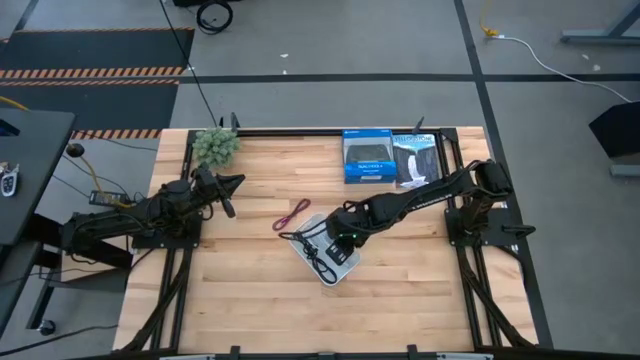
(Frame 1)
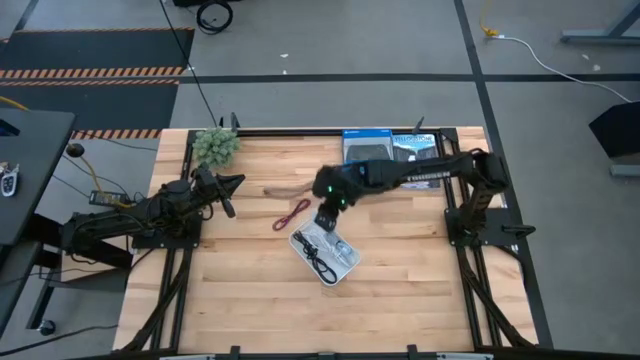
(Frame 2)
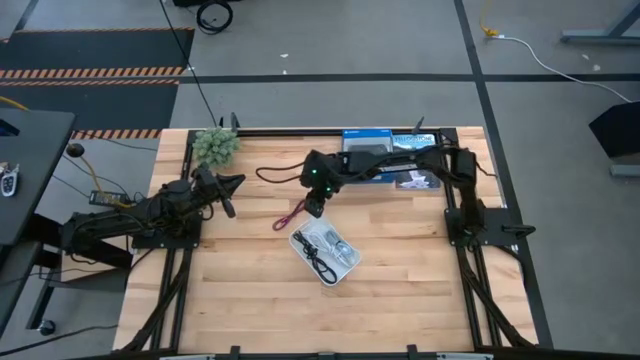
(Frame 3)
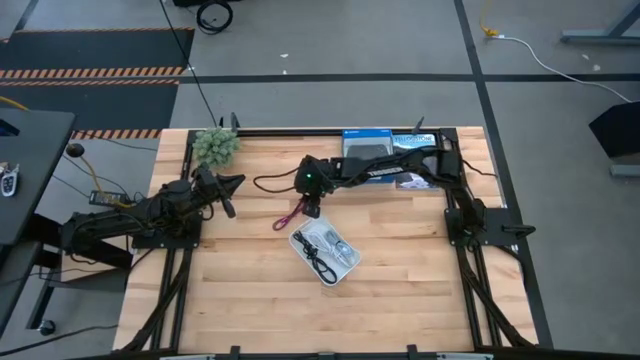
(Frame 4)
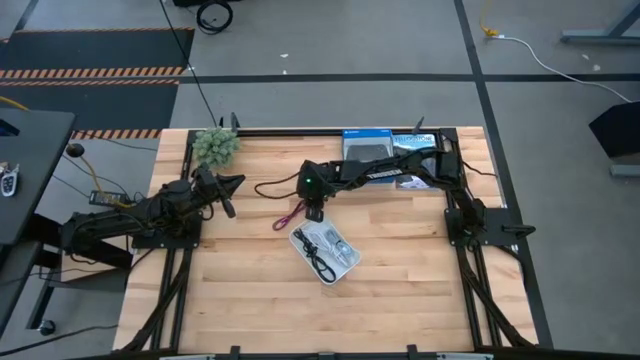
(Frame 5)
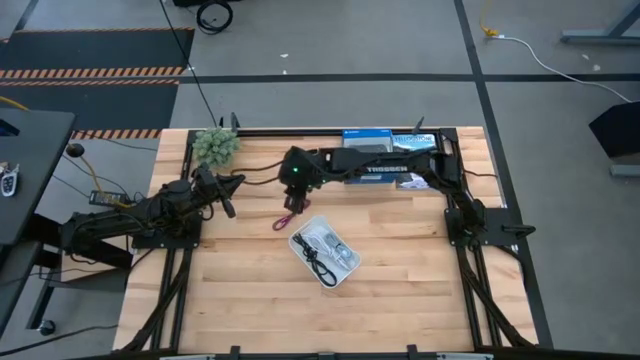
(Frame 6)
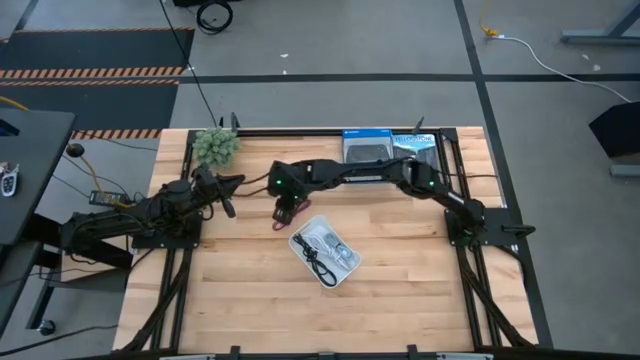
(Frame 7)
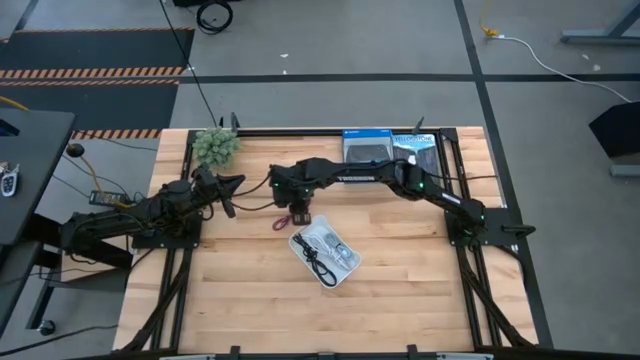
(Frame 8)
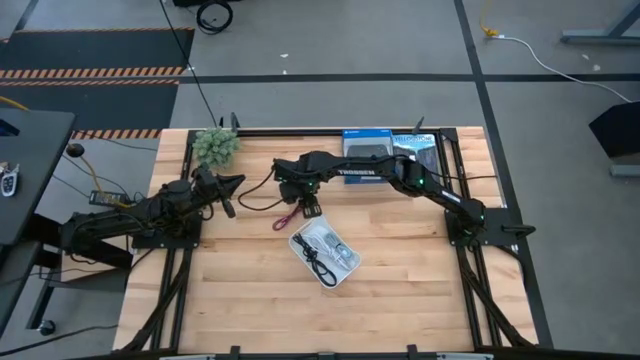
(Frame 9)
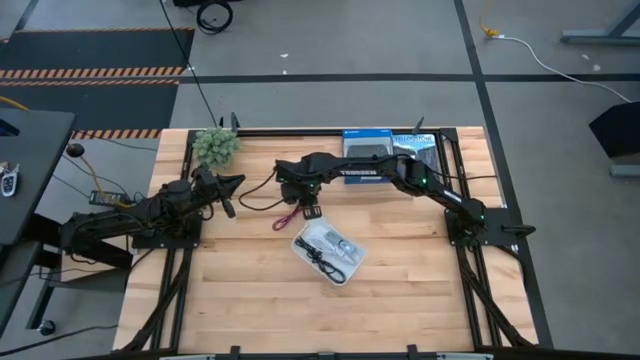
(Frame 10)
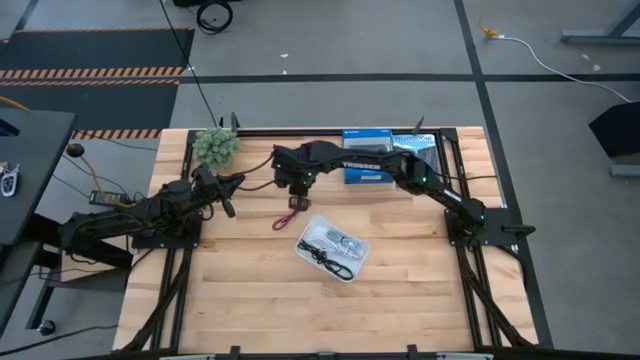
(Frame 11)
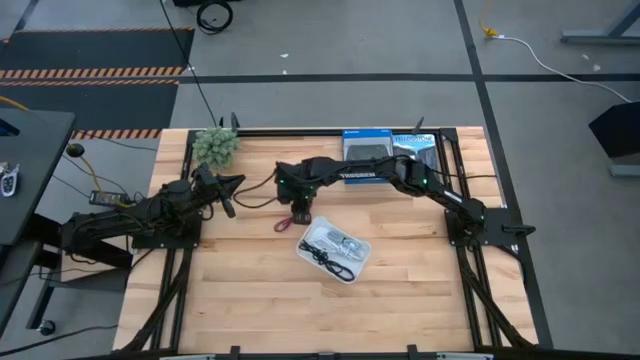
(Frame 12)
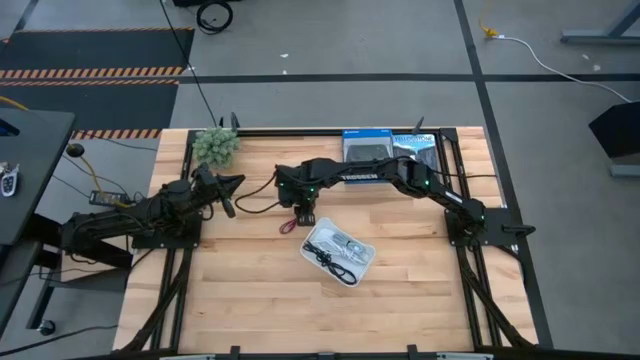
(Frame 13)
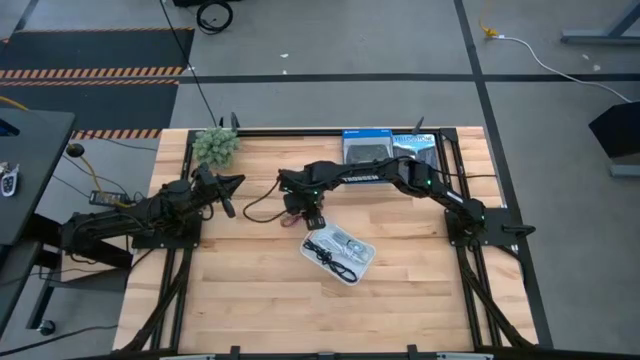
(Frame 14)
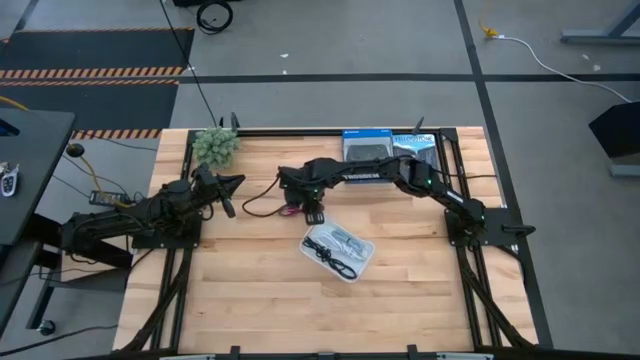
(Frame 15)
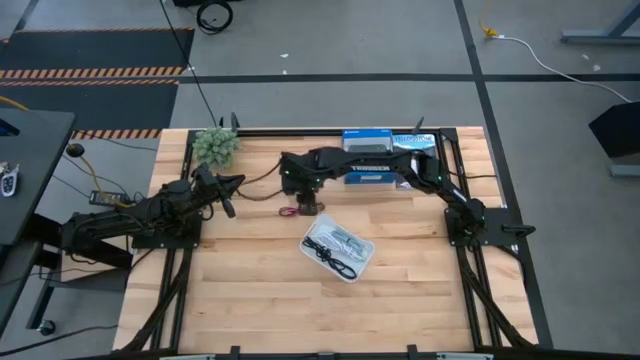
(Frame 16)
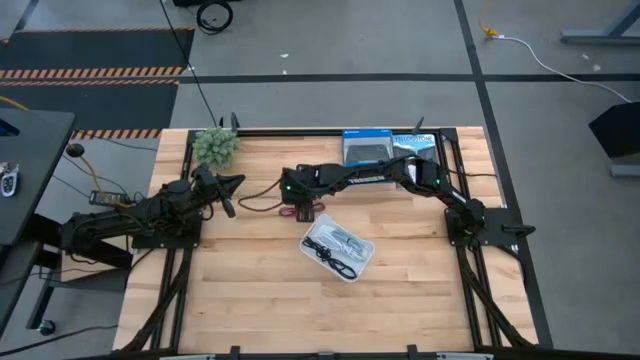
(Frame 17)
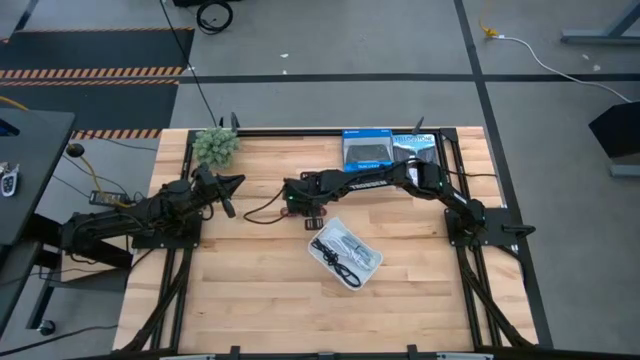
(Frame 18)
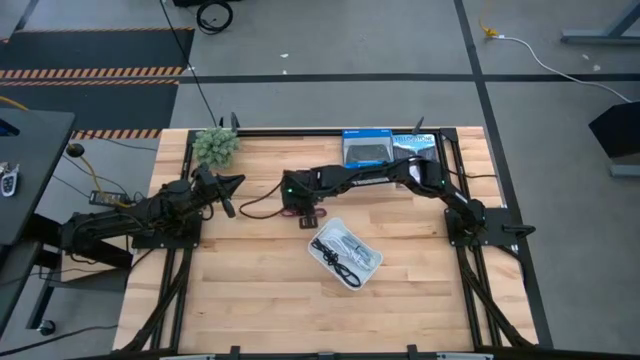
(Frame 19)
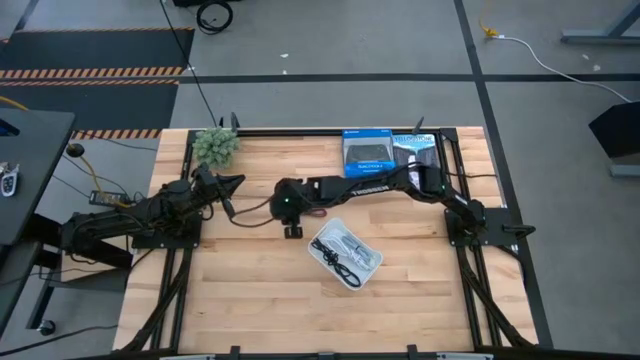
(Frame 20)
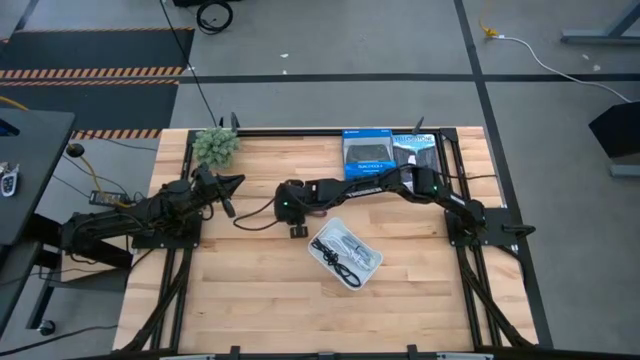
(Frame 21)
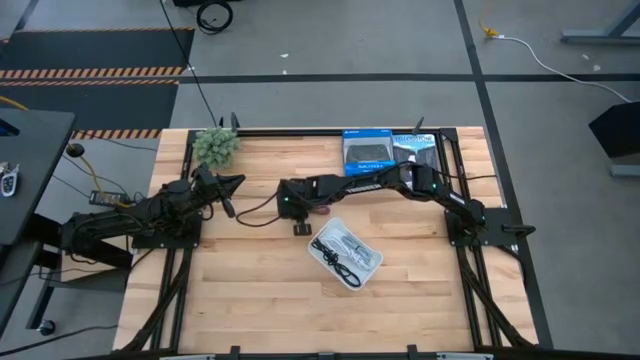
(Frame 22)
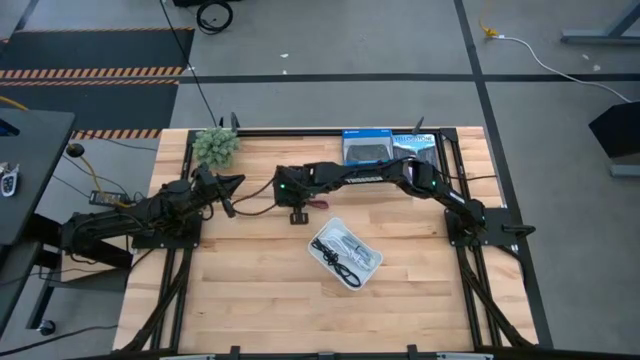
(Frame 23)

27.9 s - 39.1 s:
Task: Pick and place USB-C Cables
Put the pink and black charger cable into the white bin

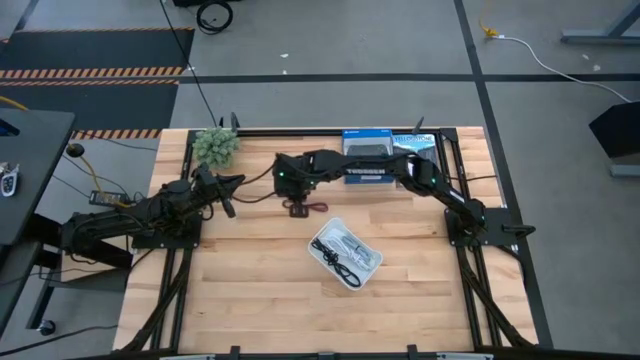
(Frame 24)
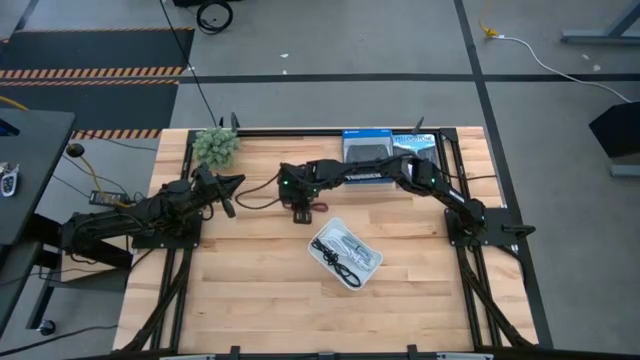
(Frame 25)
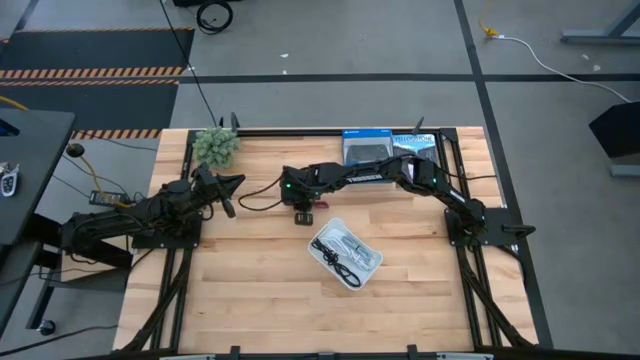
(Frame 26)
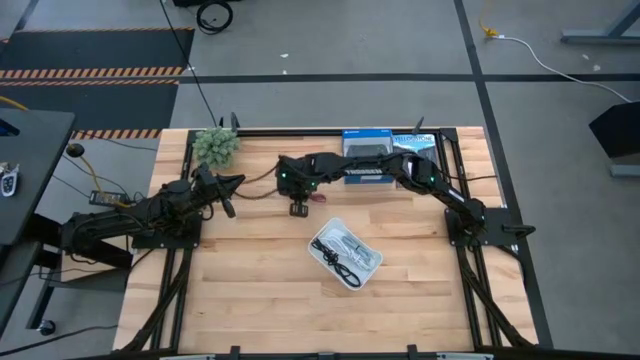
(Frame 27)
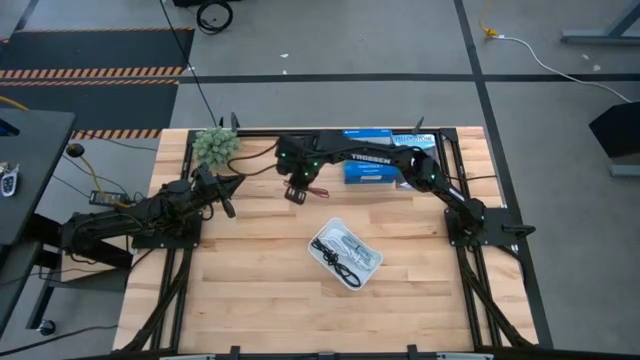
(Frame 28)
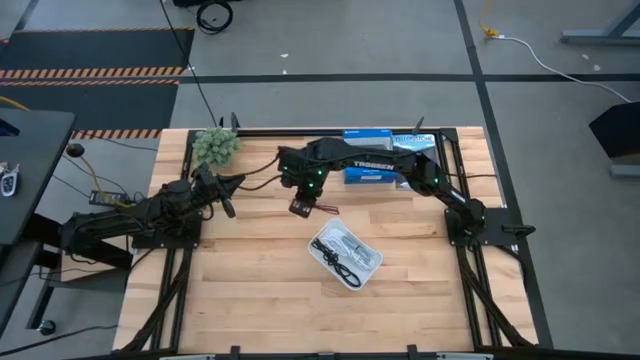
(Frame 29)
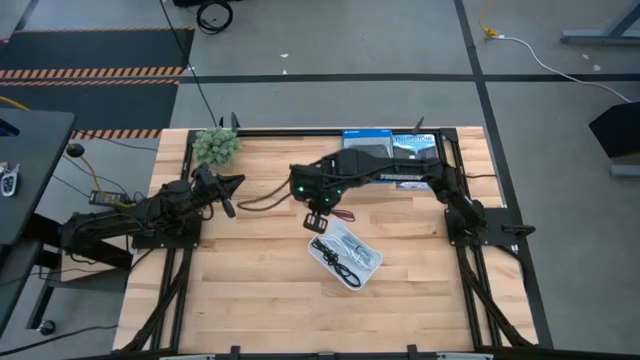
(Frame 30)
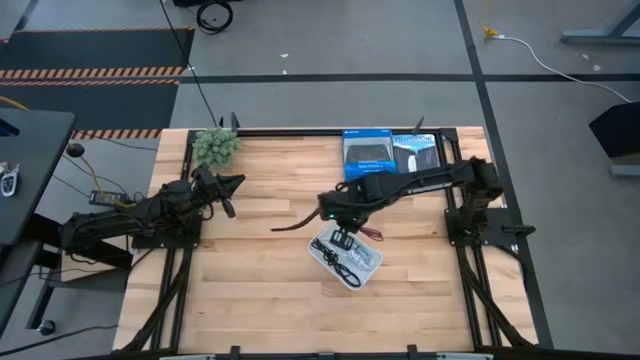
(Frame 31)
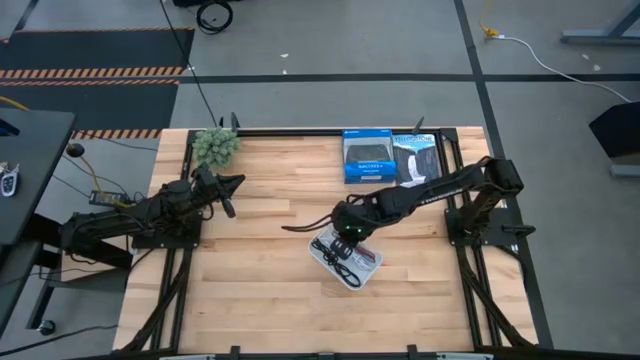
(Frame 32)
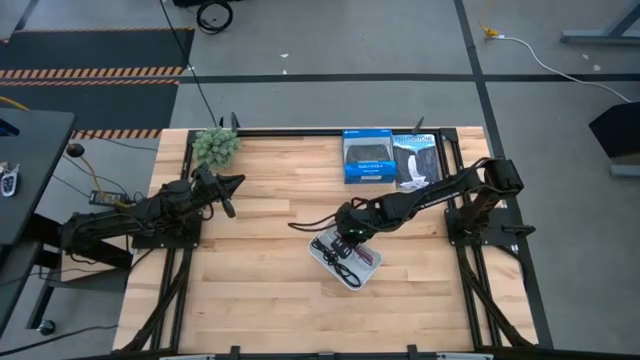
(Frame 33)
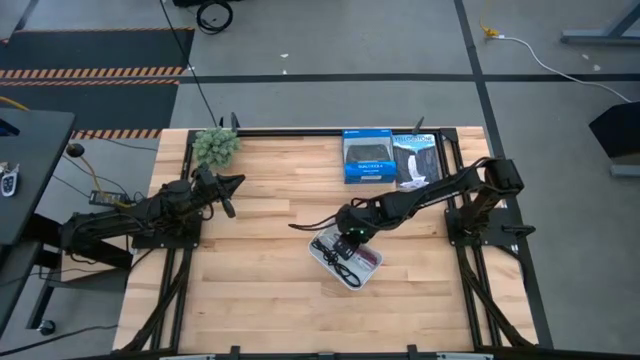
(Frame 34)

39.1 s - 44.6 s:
Put the pink and black charger cable into the white bin
